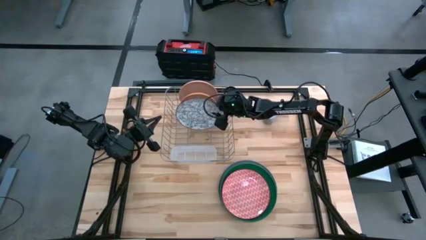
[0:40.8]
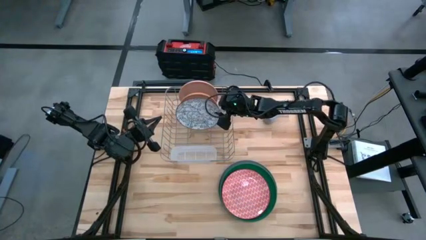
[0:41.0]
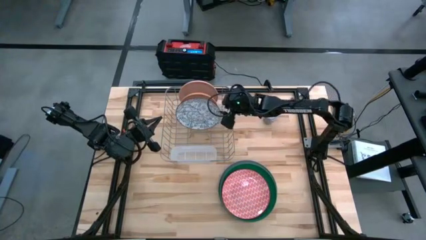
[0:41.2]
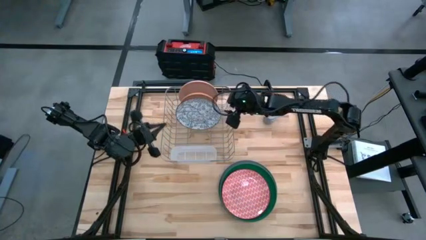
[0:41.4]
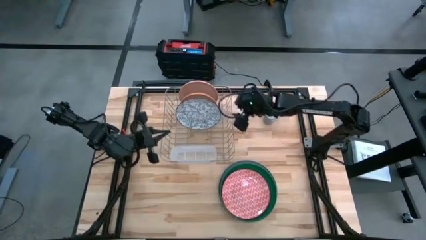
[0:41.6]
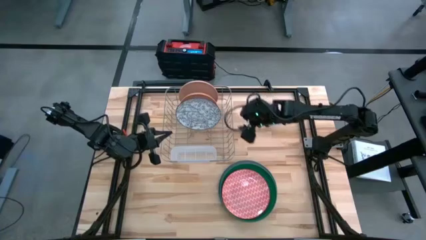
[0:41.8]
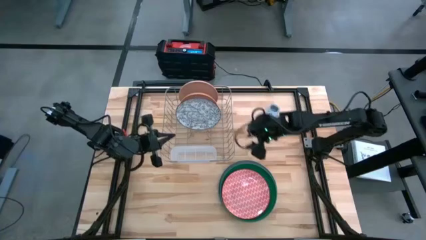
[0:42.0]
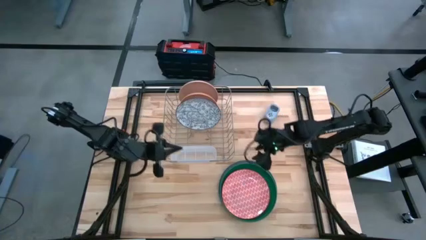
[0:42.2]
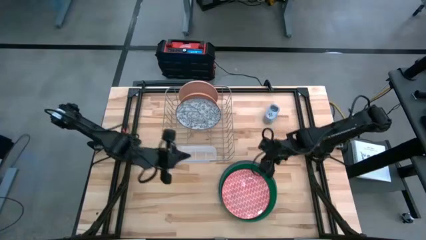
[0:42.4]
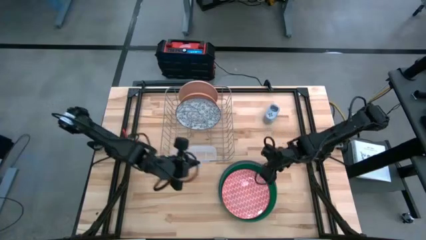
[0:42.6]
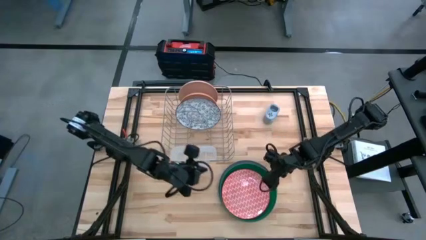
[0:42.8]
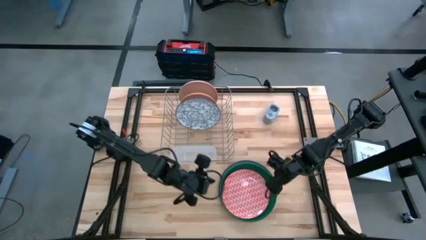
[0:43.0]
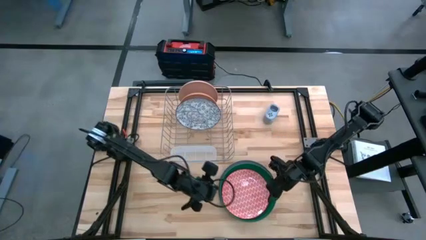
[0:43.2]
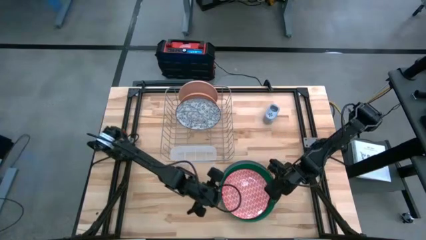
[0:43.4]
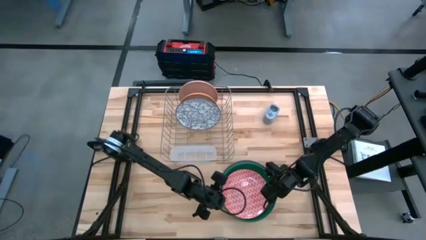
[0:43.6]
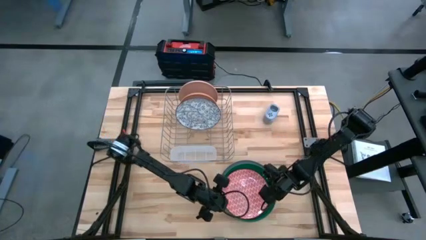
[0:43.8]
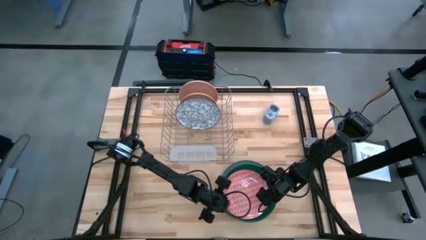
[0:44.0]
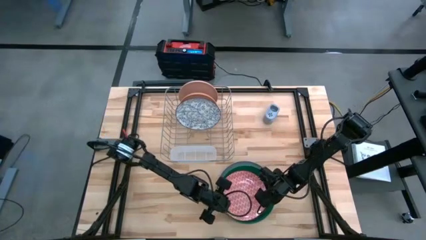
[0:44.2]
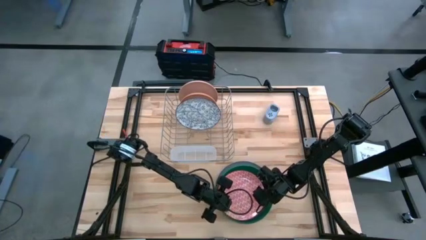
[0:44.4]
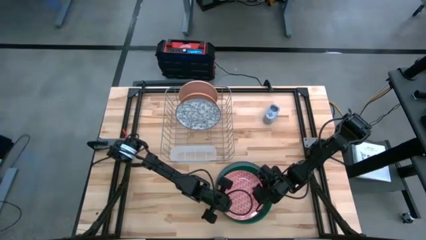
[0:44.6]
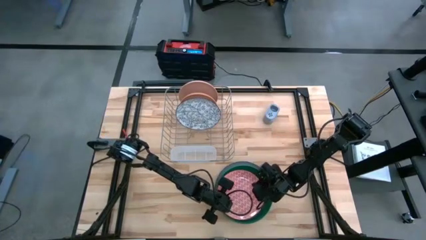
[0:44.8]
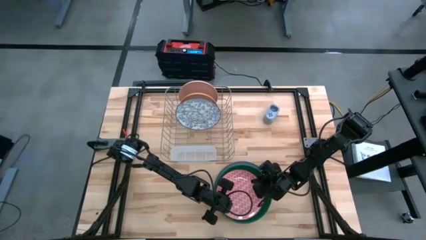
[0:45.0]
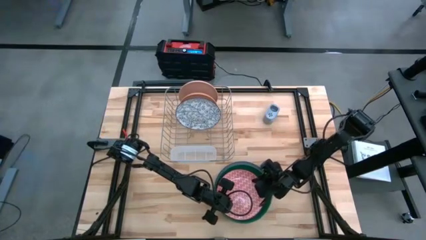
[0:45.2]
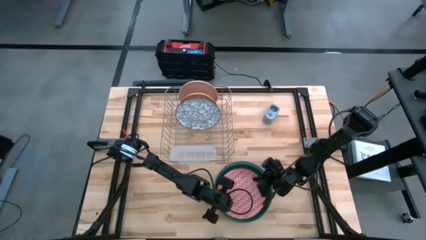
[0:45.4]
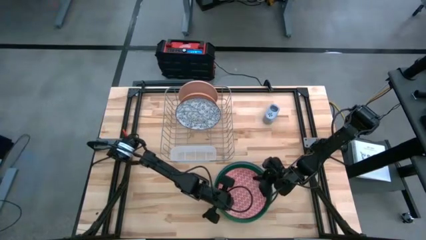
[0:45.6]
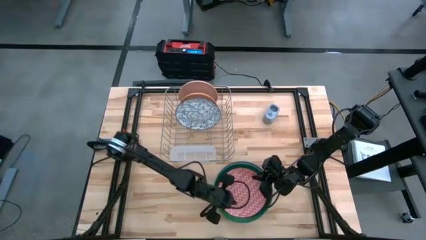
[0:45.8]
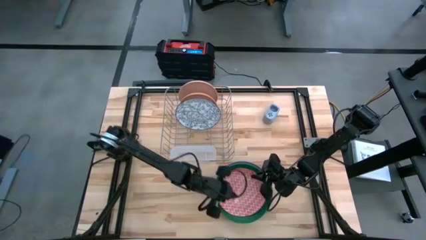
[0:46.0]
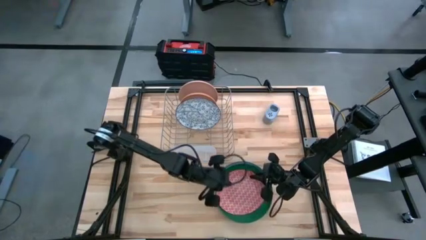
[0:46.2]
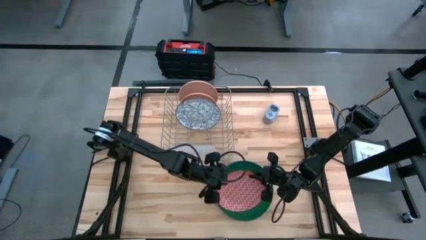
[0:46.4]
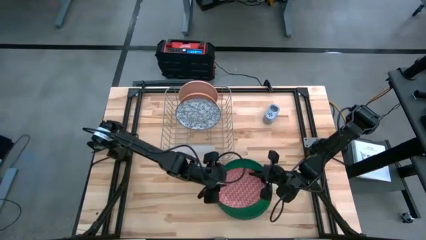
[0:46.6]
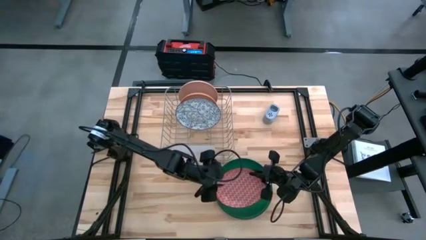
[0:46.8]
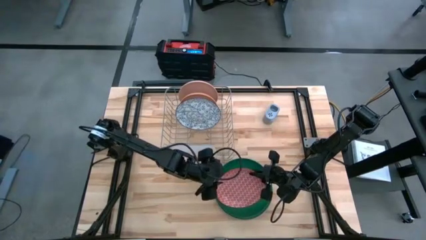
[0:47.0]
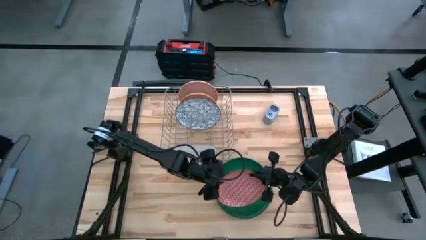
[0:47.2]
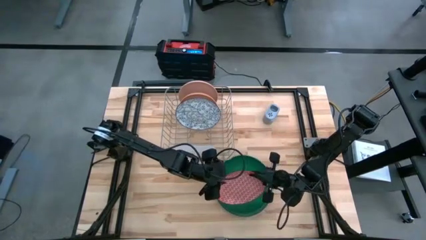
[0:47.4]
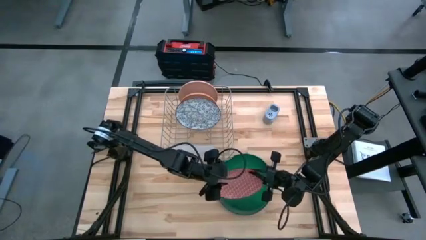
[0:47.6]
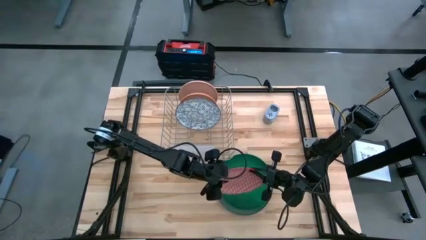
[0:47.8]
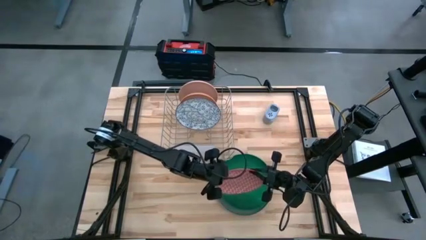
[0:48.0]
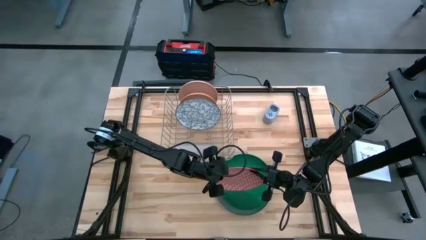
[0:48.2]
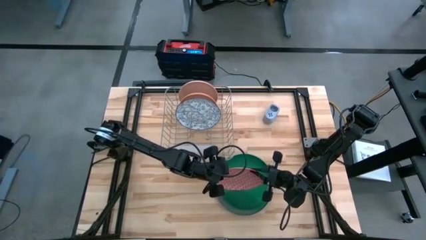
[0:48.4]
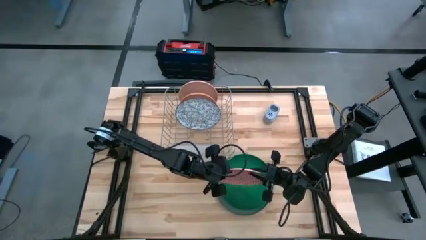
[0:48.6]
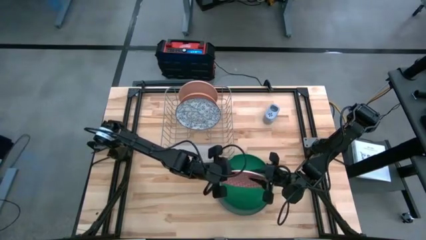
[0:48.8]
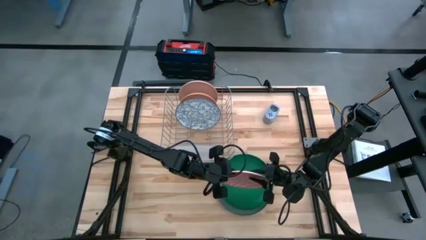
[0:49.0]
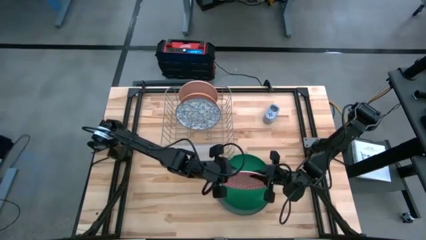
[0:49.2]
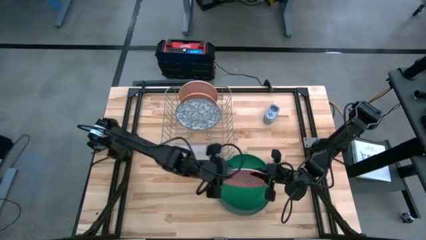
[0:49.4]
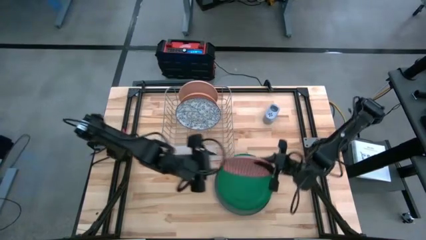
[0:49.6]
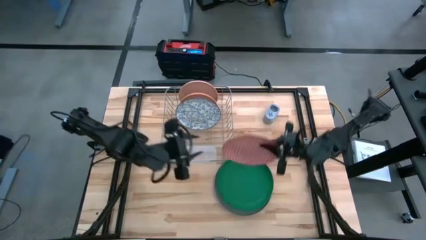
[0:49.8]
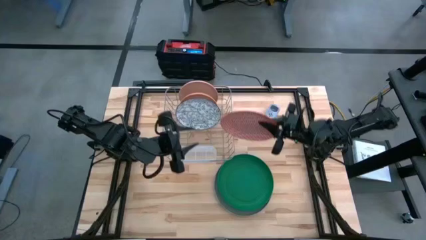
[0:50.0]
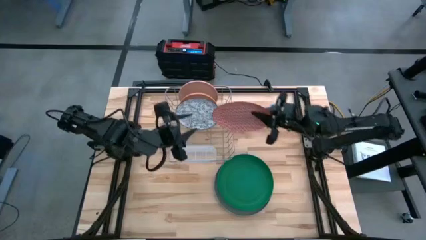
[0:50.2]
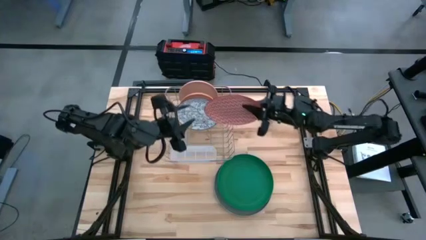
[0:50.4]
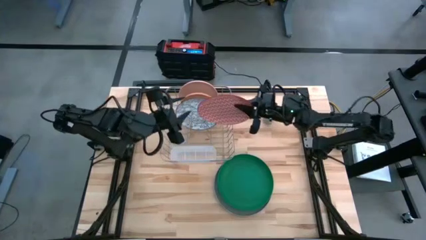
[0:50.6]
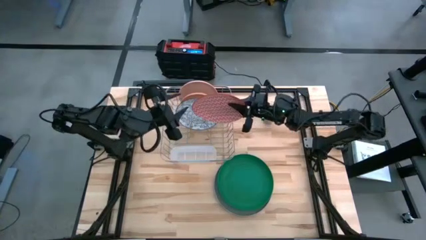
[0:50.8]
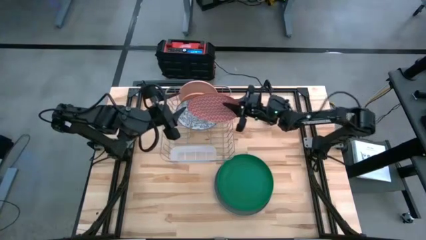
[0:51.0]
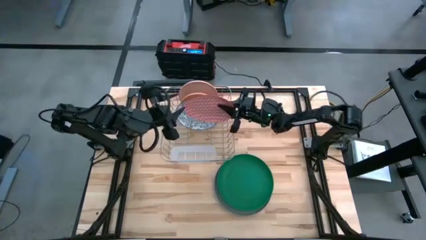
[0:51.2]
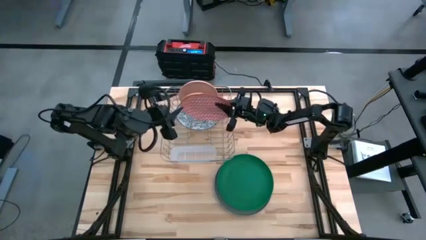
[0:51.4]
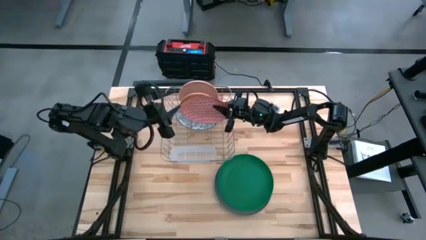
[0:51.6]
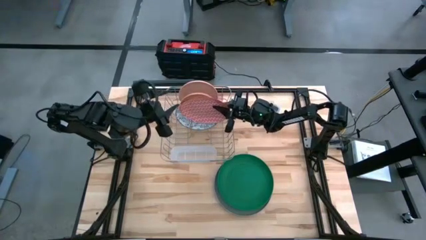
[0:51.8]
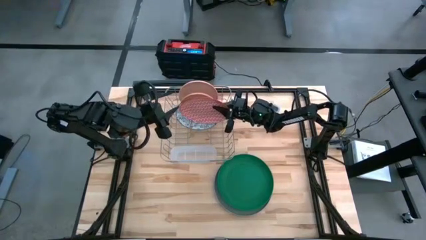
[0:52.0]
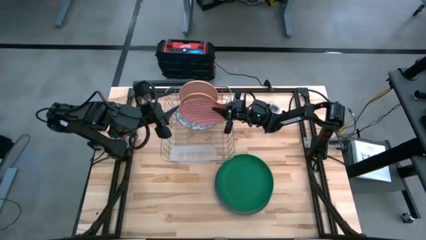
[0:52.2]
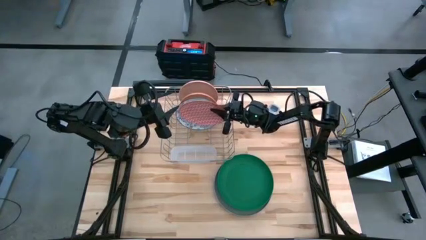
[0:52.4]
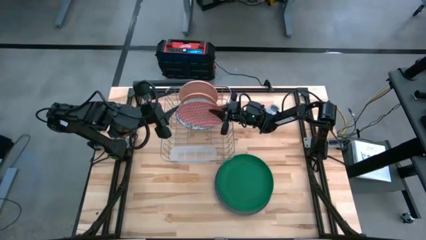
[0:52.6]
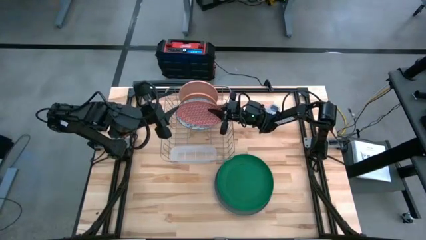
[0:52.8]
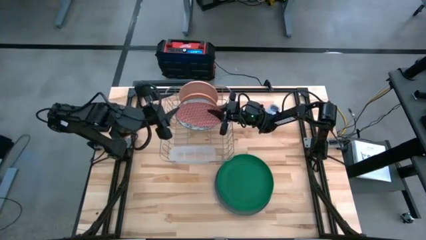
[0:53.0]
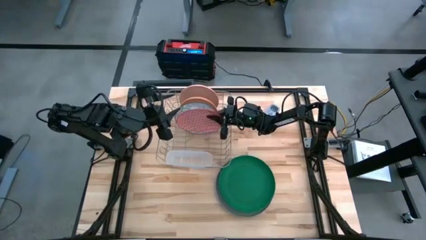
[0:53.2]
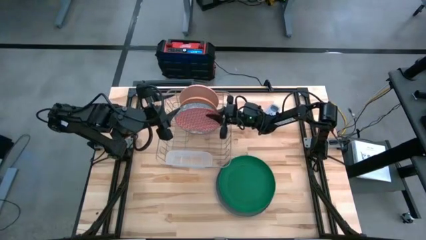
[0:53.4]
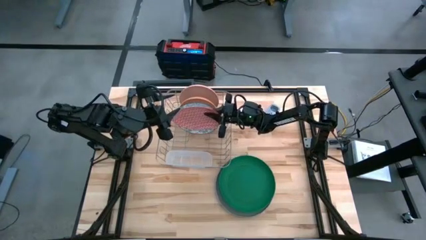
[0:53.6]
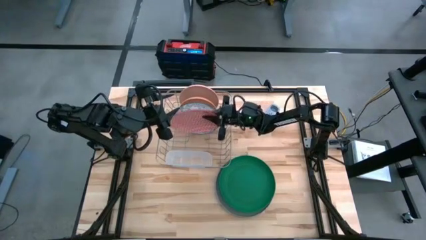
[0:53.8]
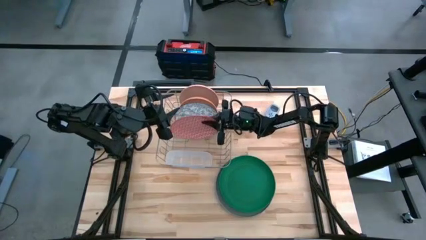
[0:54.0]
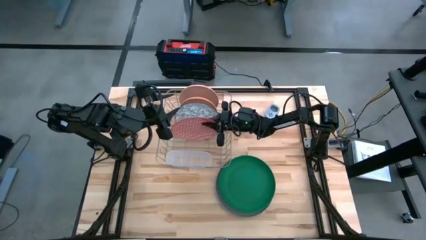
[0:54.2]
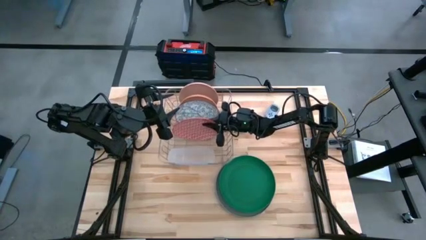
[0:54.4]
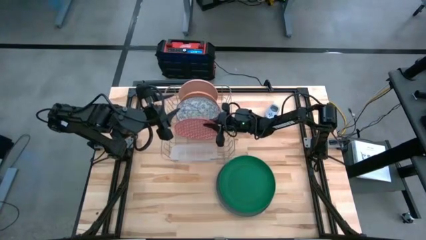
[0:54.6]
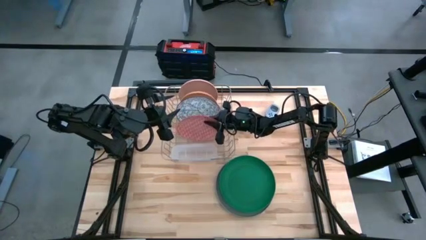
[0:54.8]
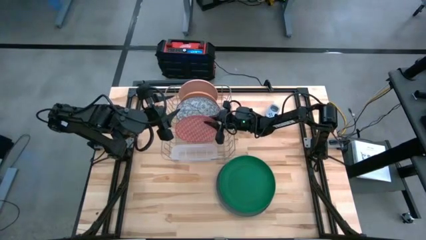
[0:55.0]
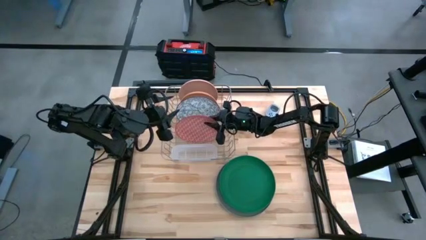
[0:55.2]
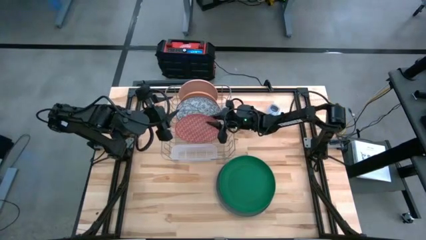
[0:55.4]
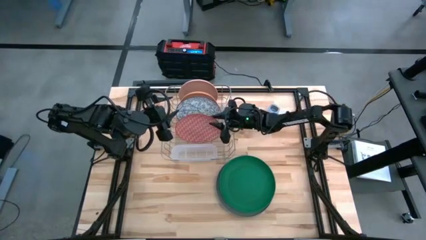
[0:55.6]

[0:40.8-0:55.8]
Task: Sort dishes
Put the red patterned plate in the dish rack
